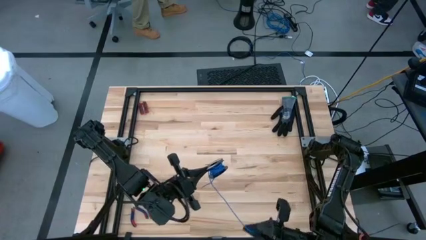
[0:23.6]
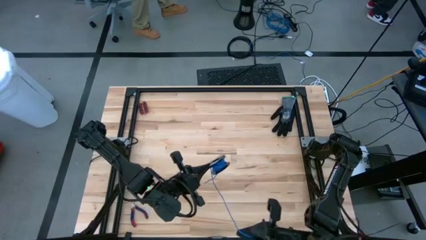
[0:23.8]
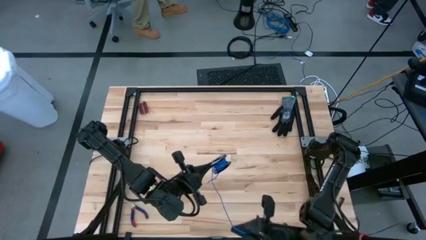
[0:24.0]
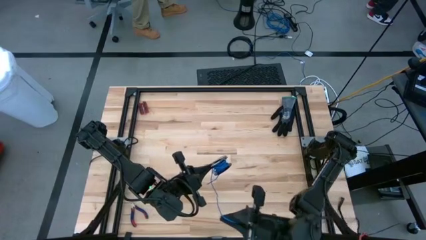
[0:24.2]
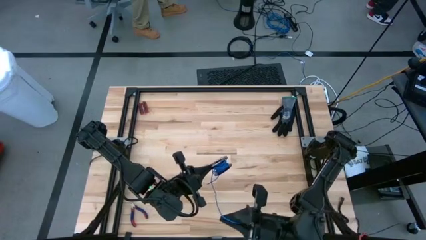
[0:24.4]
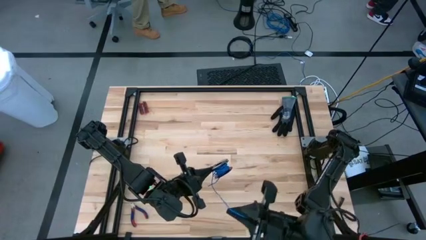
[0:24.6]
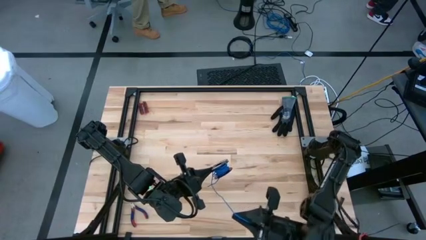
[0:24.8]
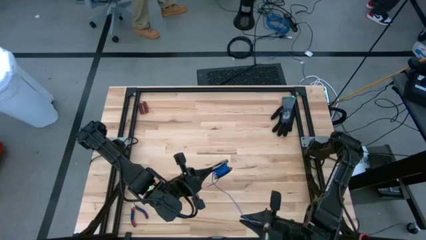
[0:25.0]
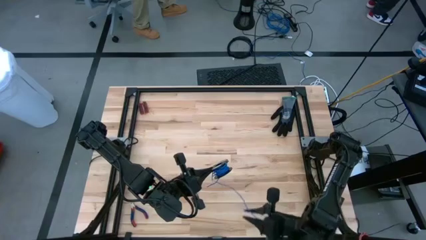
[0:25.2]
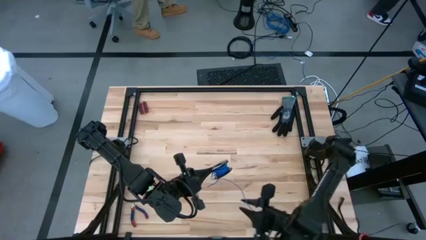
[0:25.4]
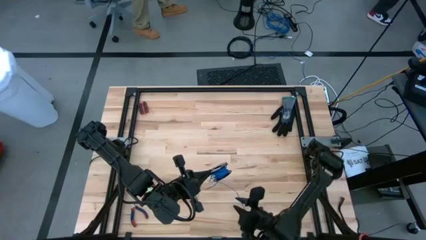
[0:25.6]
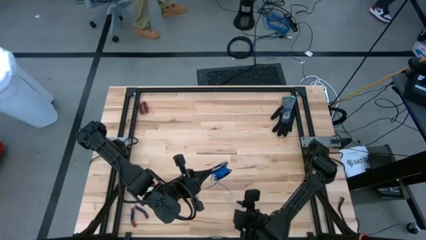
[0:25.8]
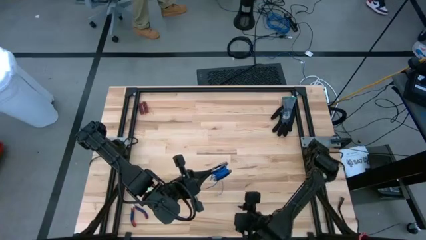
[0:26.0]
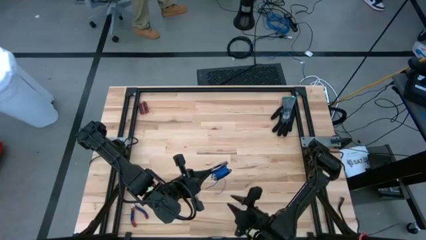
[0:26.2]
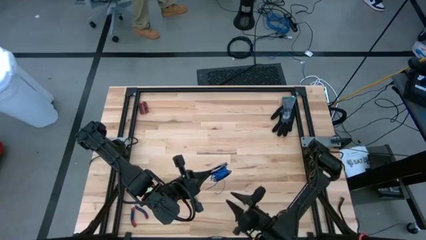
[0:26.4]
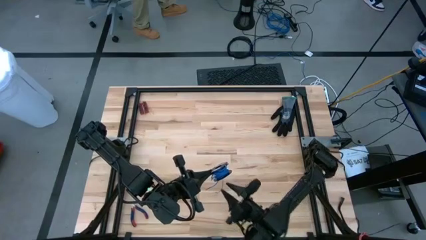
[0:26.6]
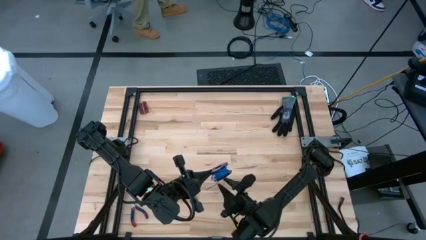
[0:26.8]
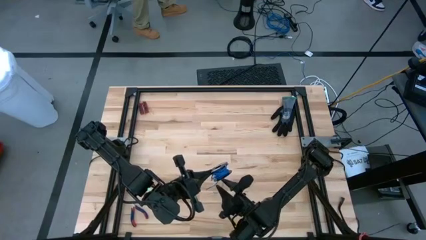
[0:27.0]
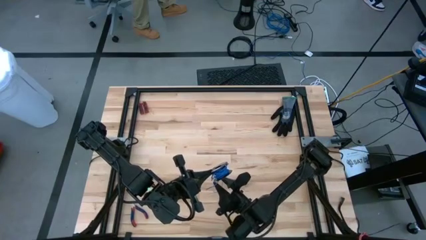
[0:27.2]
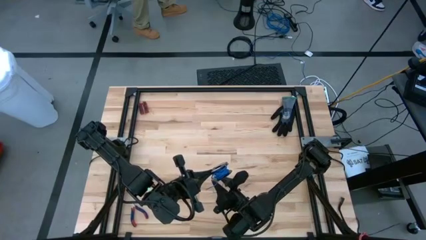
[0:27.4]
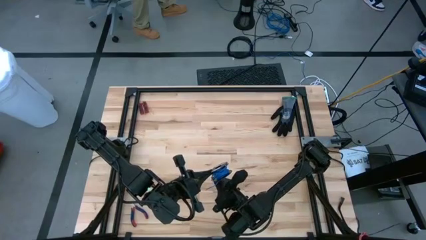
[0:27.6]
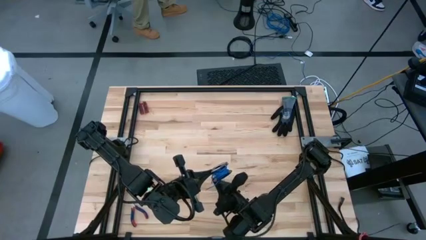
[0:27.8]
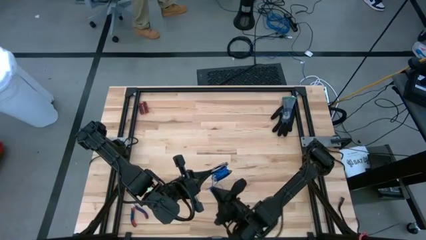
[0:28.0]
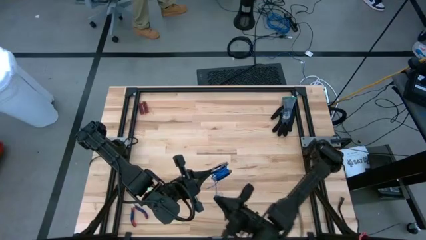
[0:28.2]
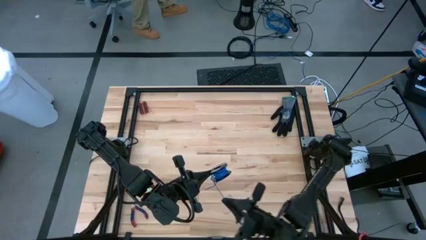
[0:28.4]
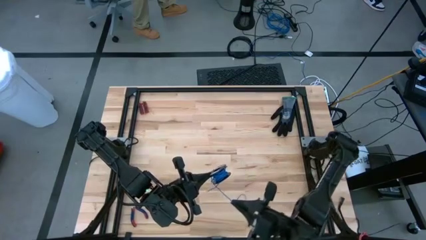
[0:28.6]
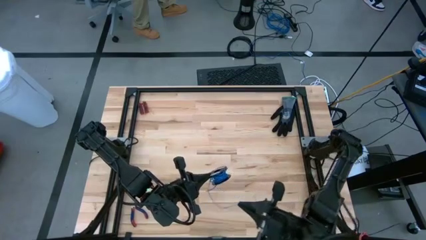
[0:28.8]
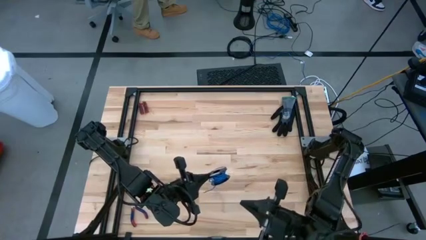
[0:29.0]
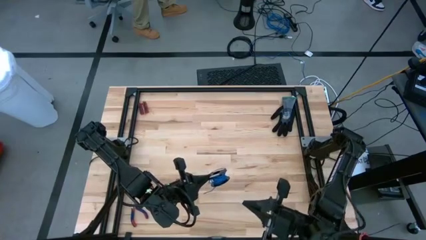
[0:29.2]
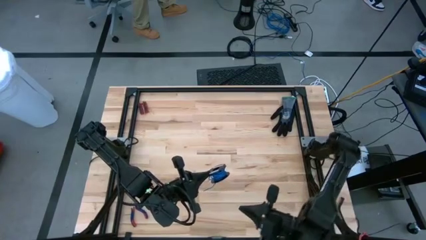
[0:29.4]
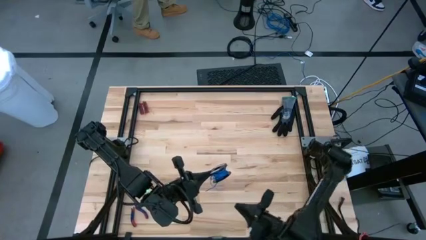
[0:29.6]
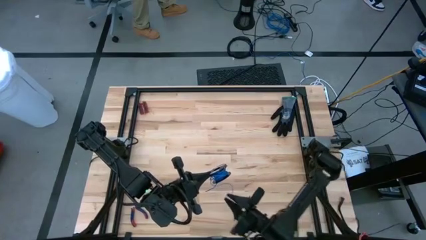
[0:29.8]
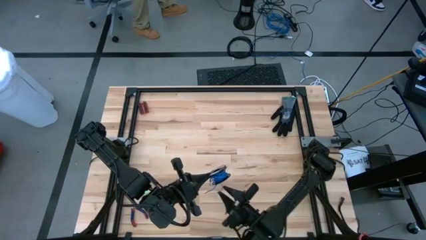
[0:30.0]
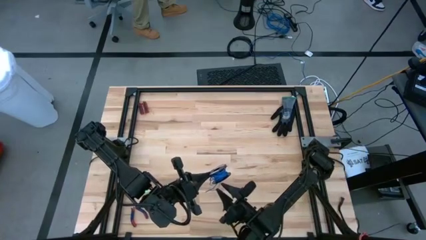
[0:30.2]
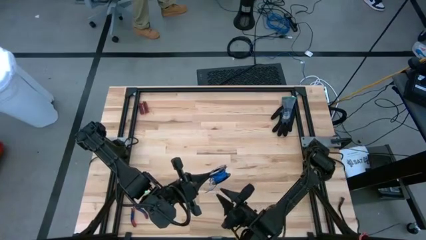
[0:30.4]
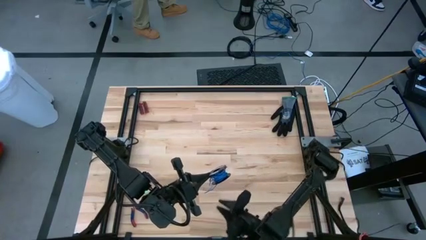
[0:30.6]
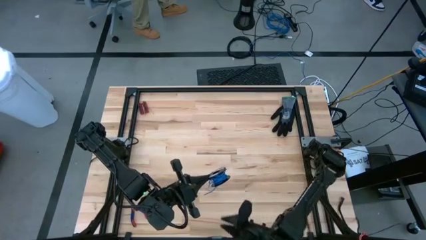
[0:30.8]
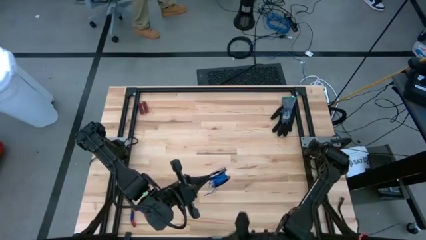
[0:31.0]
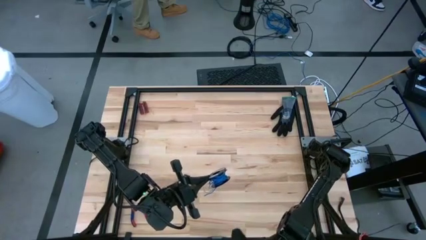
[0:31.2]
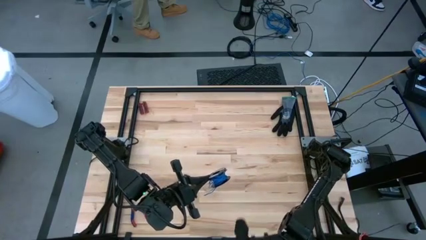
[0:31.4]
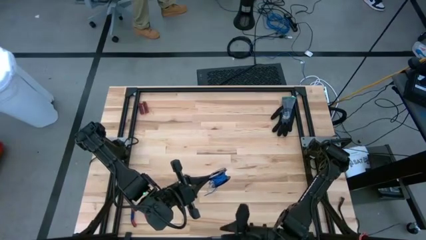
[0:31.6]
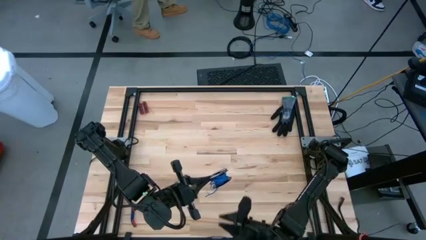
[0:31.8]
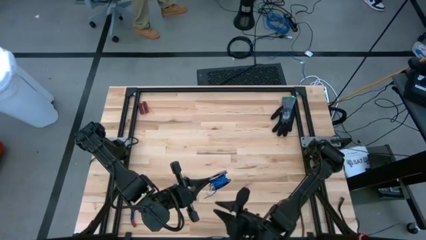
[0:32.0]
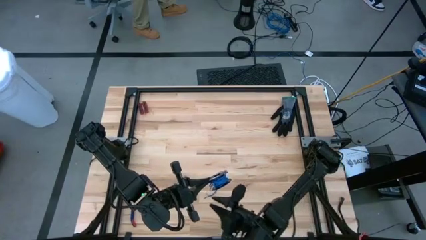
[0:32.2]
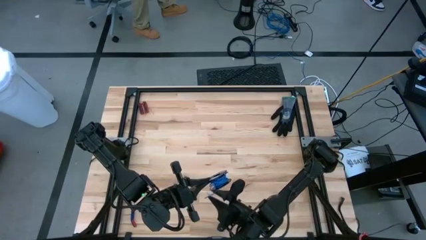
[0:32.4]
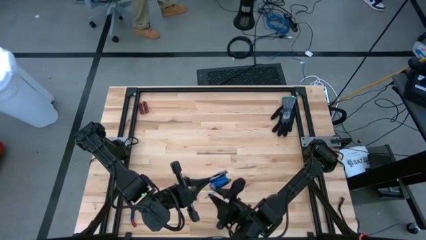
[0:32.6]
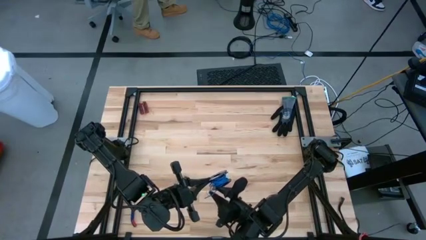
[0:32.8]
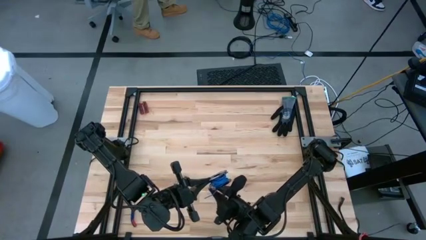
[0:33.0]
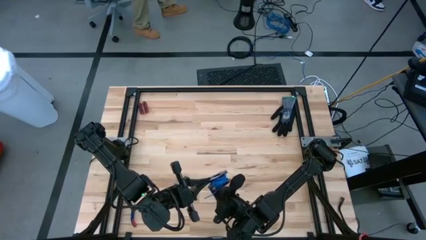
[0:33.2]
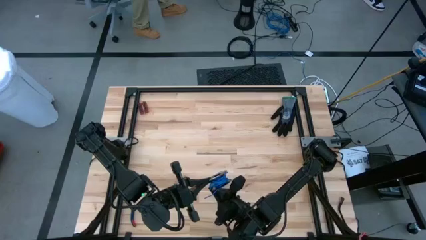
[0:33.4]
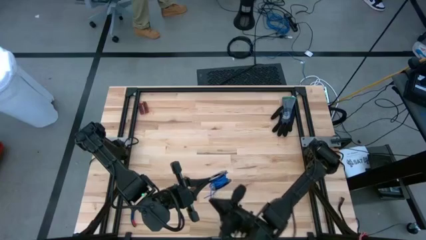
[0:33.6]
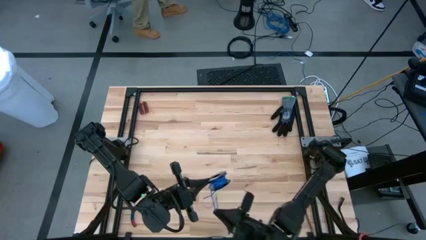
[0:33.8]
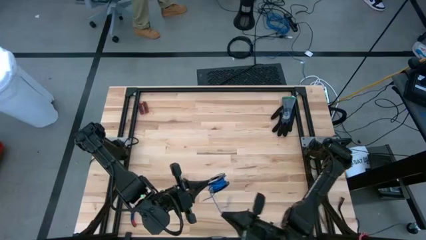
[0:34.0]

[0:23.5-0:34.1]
Task: Coil cords
Uncoil the blue wire from the spool

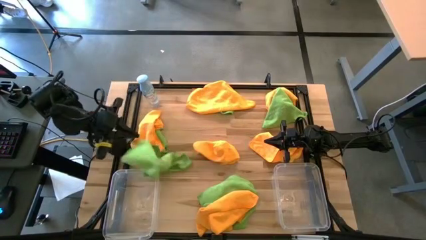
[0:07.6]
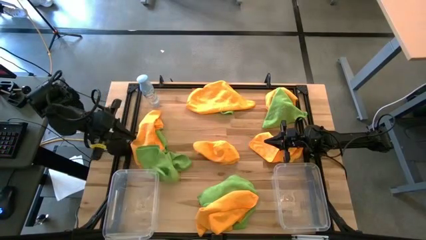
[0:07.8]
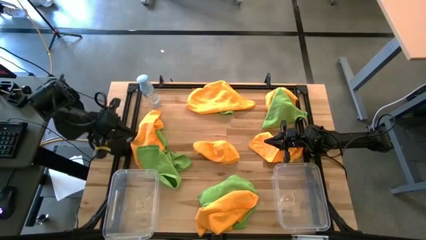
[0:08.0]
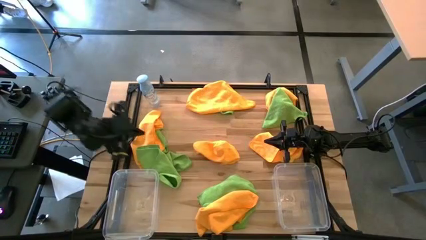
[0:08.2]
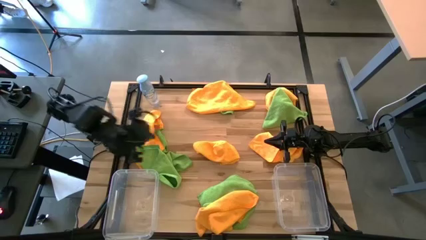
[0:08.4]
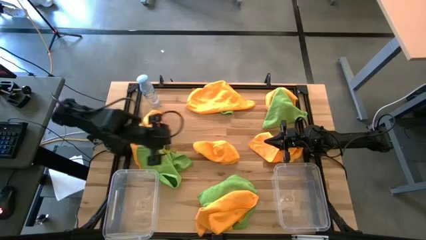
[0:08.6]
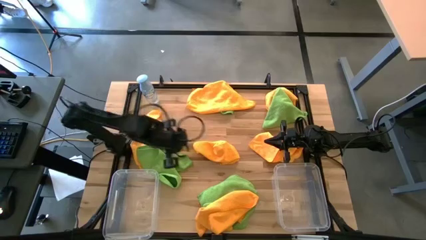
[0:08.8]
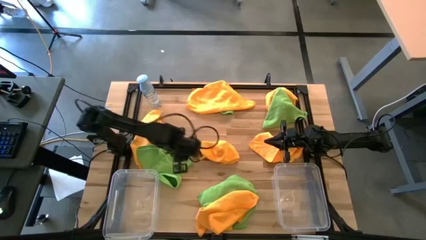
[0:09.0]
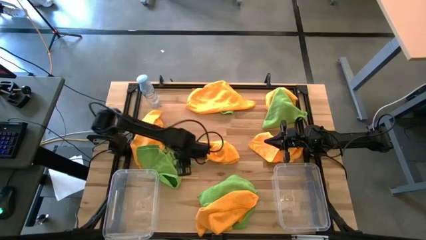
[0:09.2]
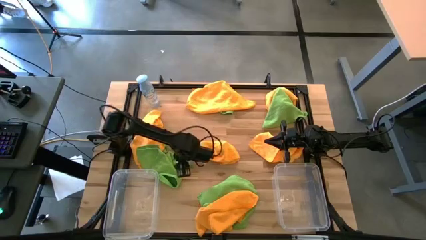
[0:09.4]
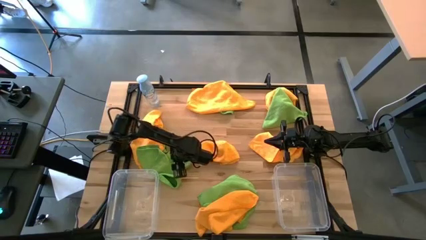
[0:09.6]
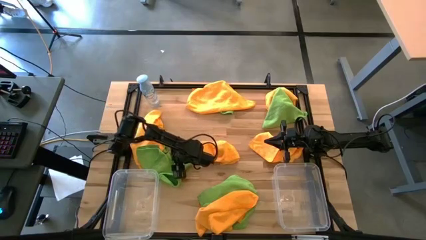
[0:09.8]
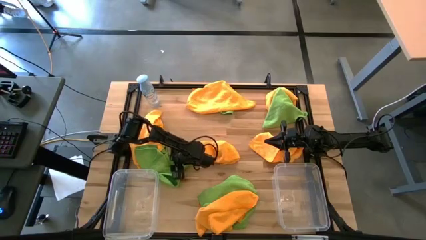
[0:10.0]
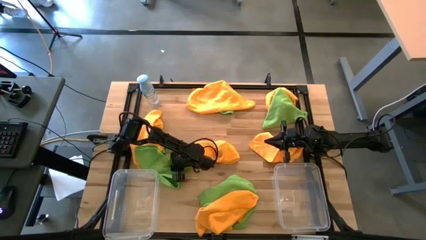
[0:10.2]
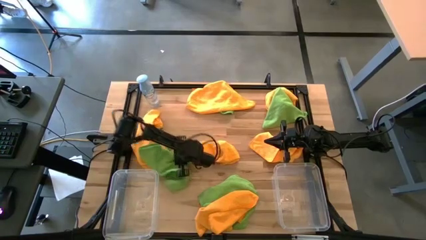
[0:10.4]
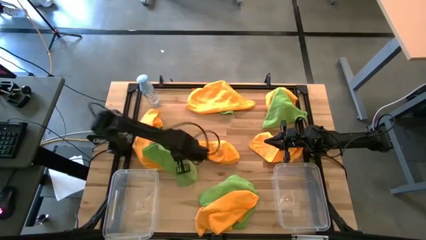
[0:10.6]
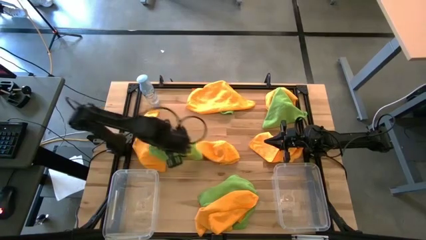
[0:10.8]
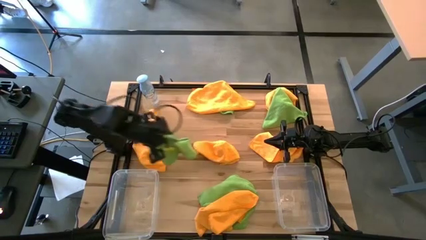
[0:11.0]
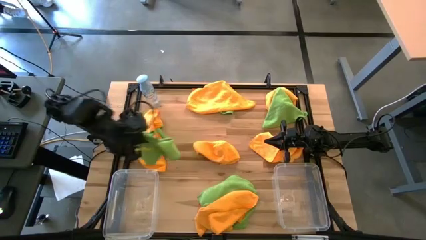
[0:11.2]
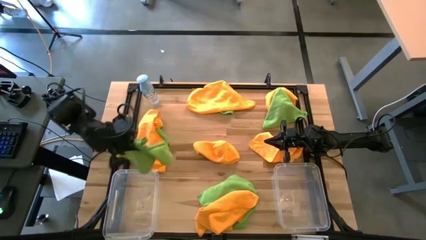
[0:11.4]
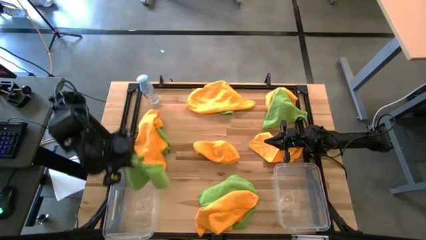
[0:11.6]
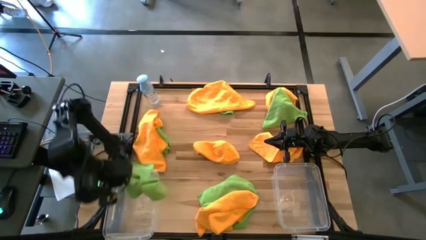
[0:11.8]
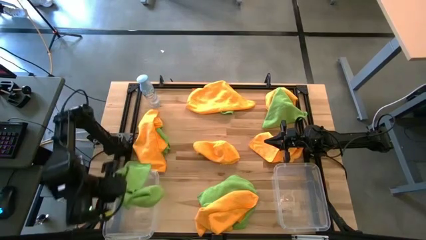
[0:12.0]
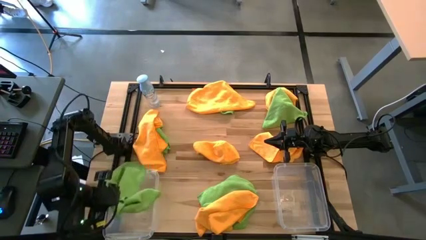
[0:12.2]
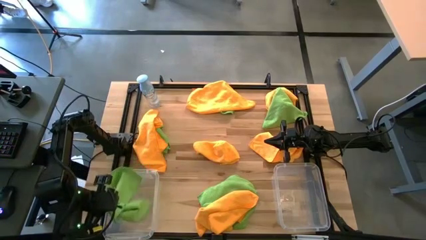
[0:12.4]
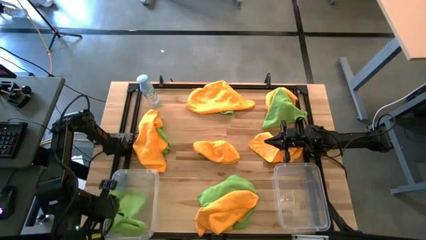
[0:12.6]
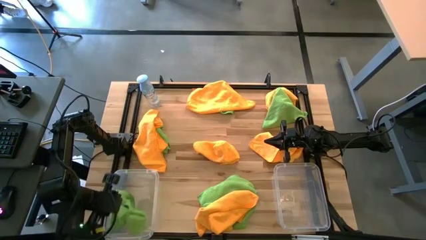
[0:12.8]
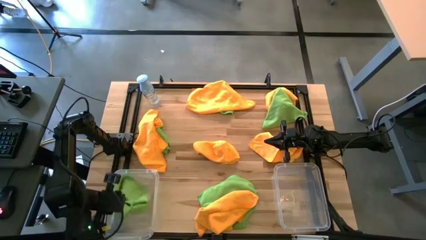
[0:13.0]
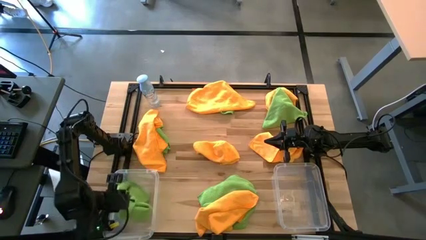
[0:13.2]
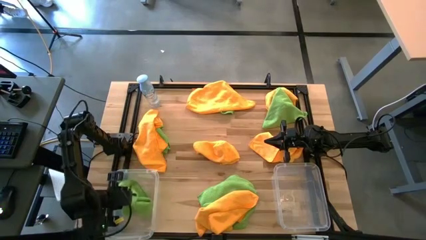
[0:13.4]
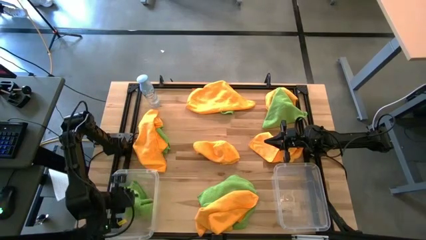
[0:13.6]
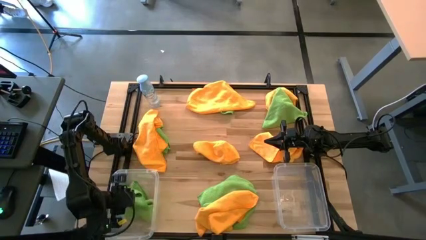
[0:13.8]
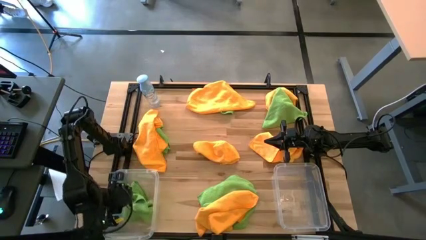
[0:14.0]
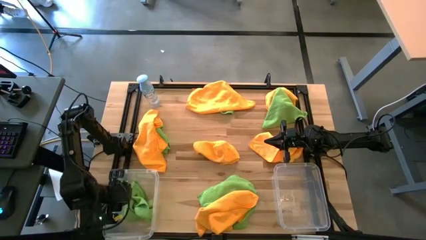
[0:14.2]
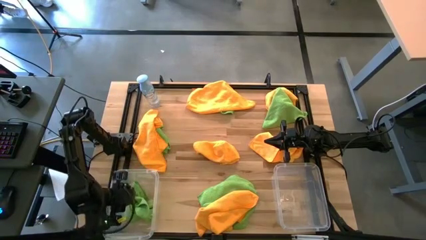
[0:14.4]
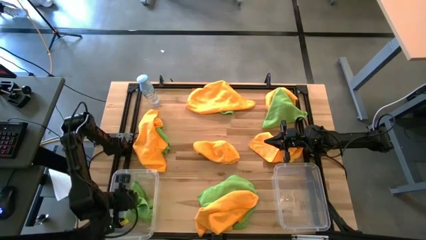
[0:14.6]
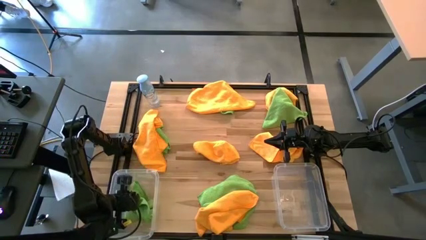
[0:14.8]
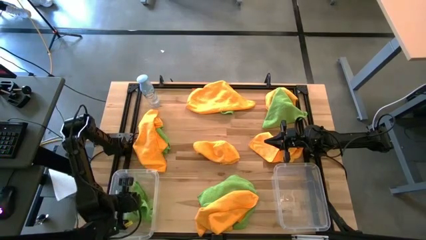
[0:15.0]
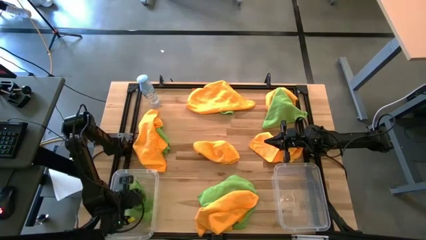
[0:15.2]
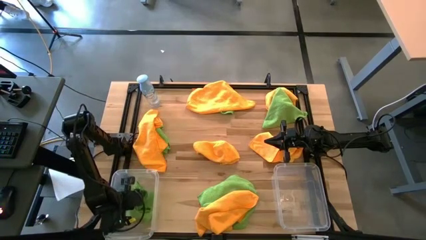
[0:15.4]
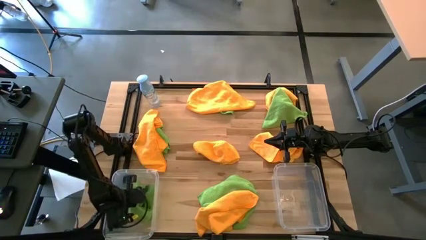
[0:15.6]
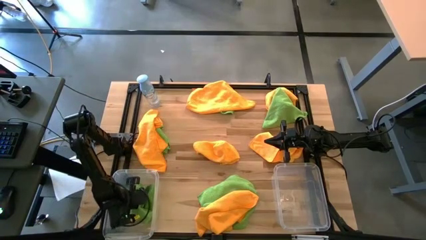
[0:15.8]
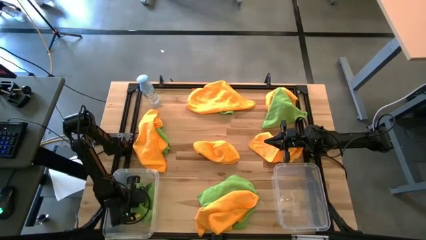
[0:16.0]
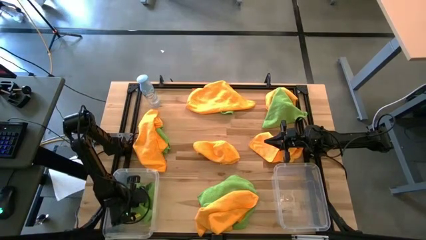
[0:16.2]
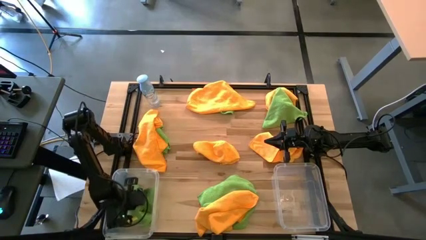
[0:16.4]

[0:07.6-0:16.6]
Task: Sort microfiber towel by color & place in baskets
Put the green towel into the left transparent bin
